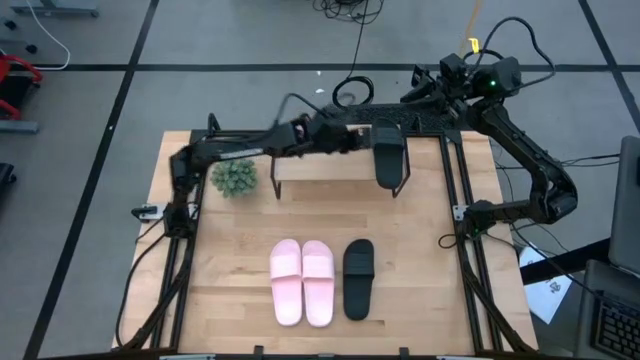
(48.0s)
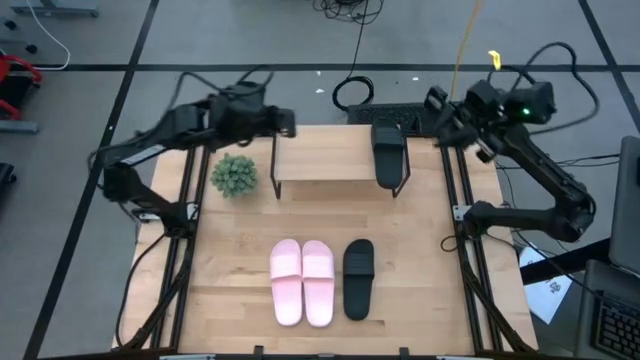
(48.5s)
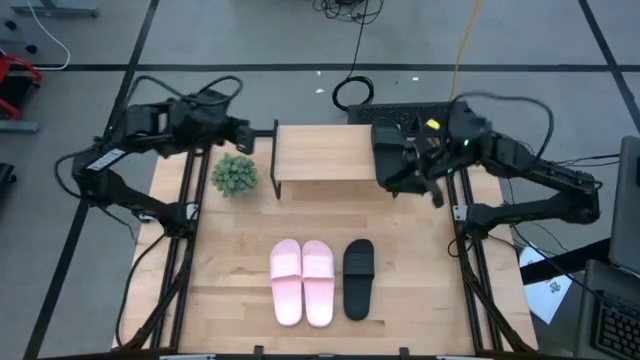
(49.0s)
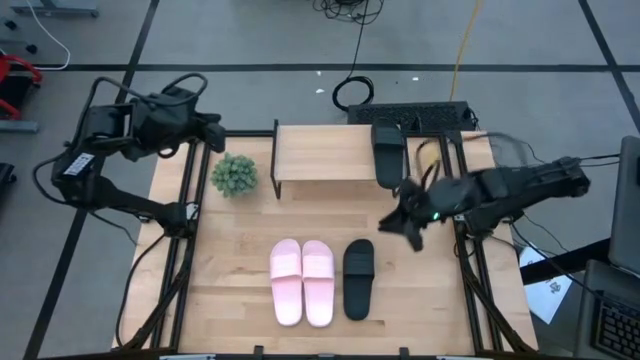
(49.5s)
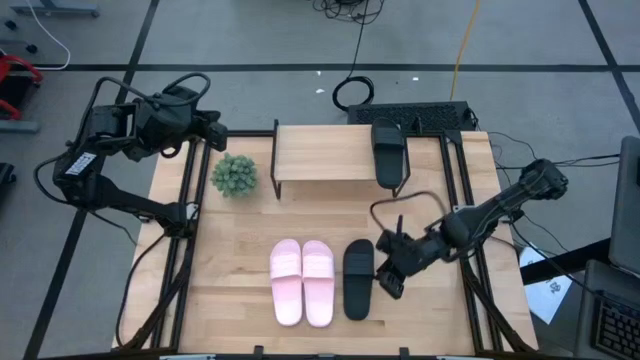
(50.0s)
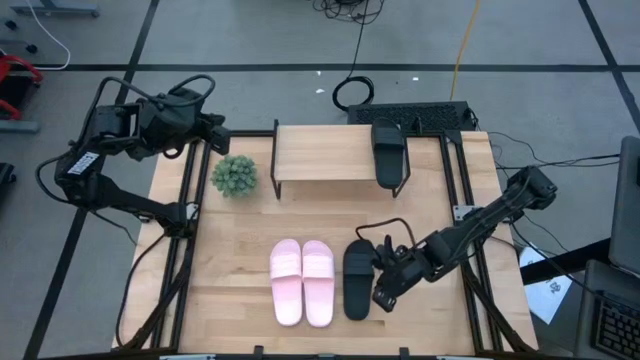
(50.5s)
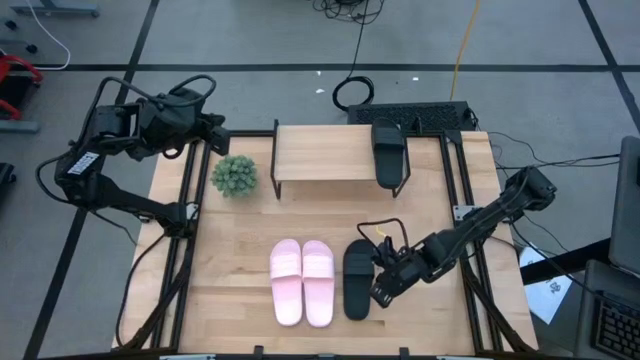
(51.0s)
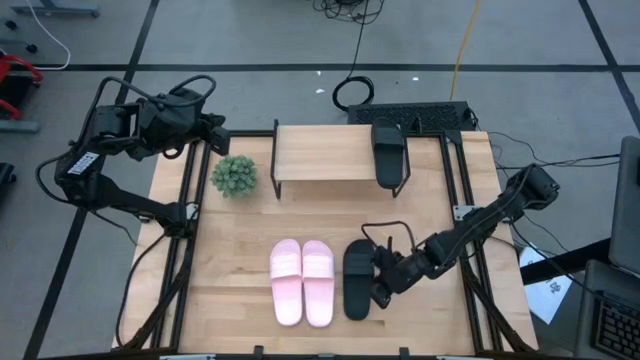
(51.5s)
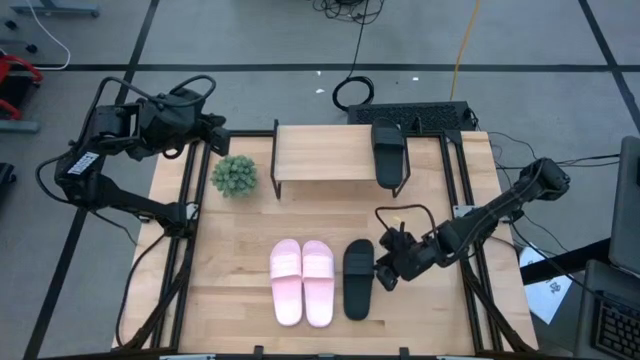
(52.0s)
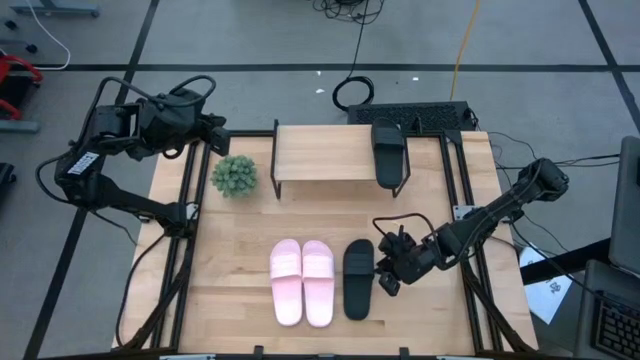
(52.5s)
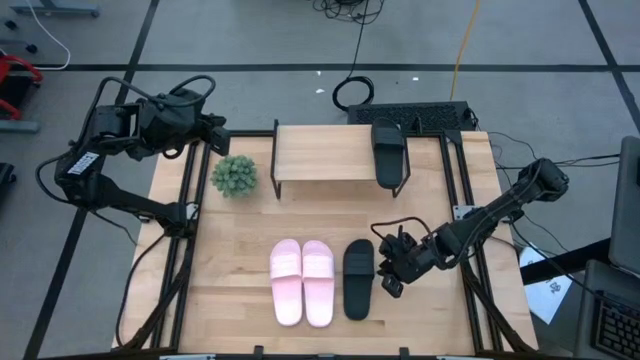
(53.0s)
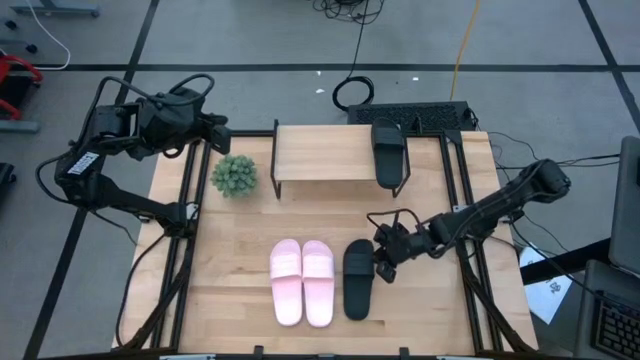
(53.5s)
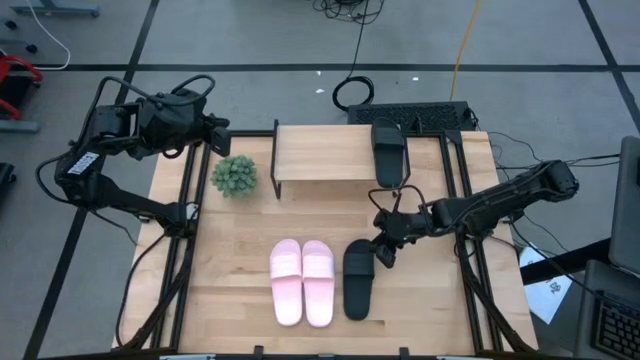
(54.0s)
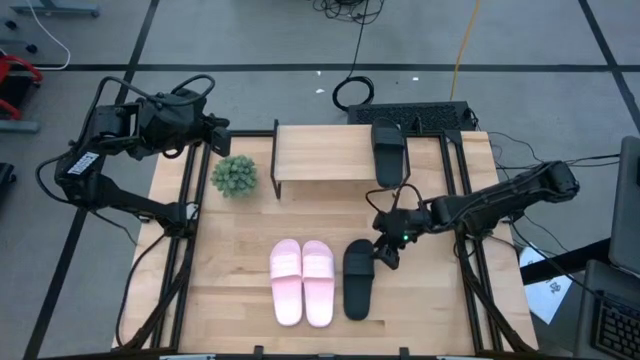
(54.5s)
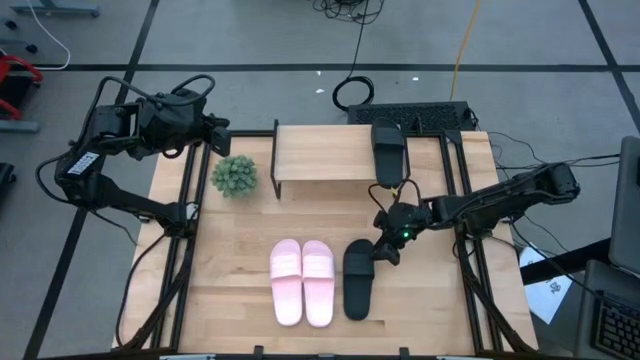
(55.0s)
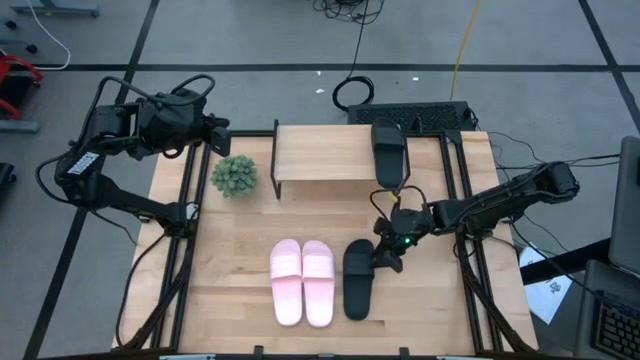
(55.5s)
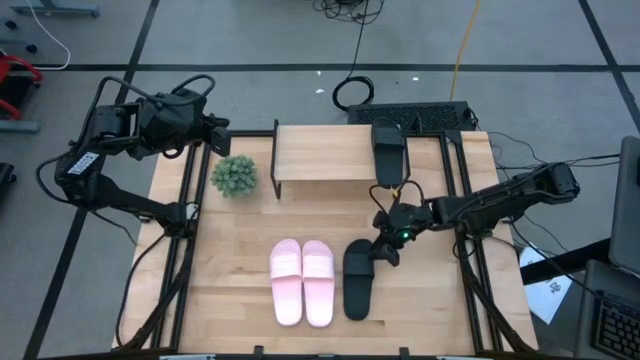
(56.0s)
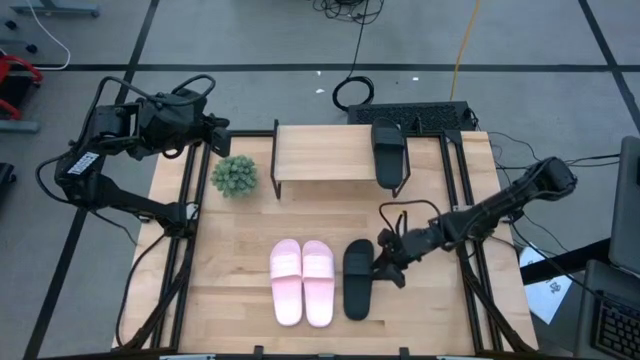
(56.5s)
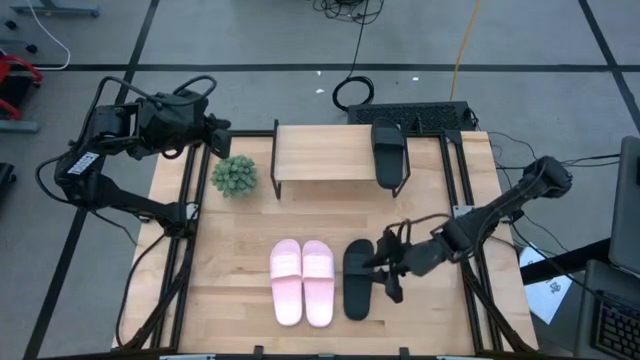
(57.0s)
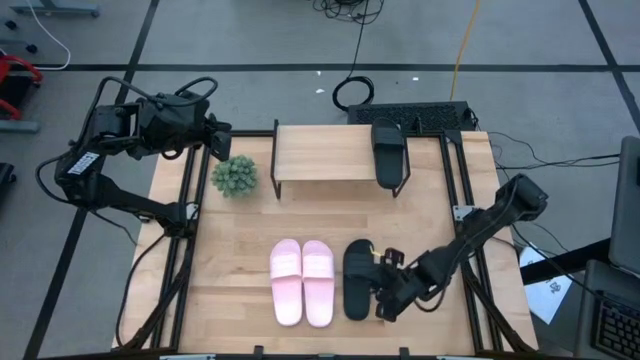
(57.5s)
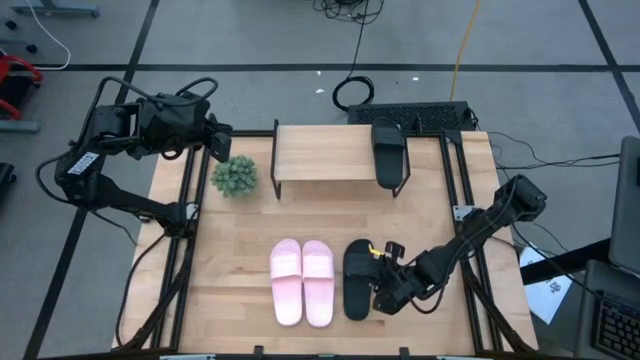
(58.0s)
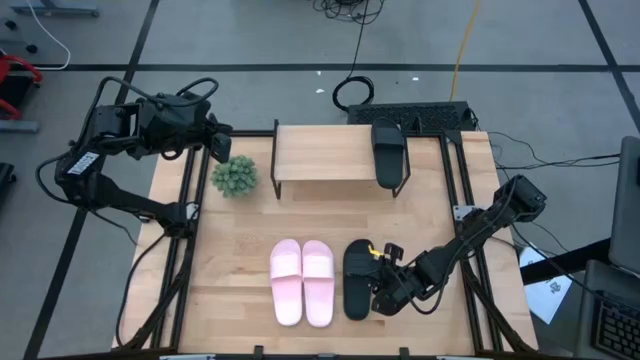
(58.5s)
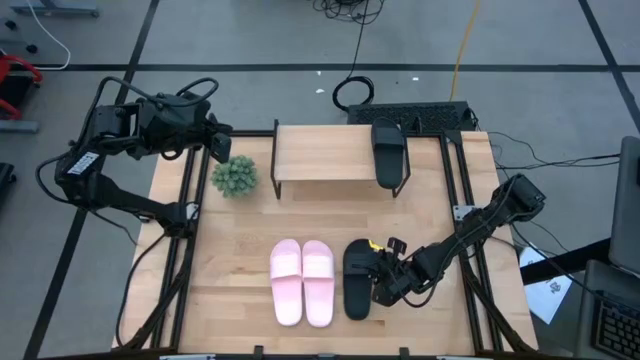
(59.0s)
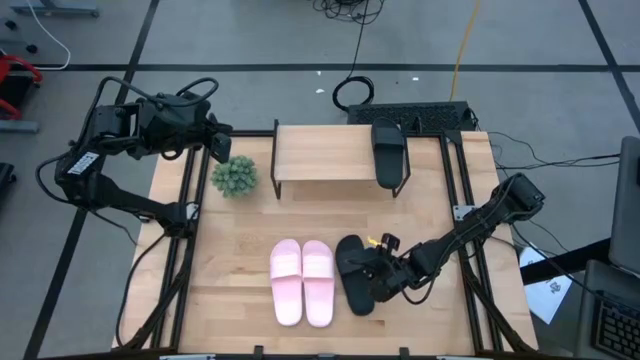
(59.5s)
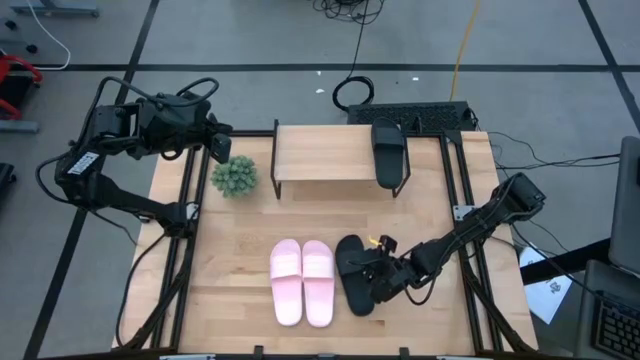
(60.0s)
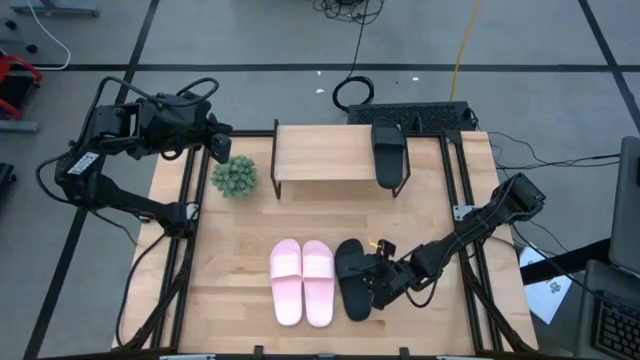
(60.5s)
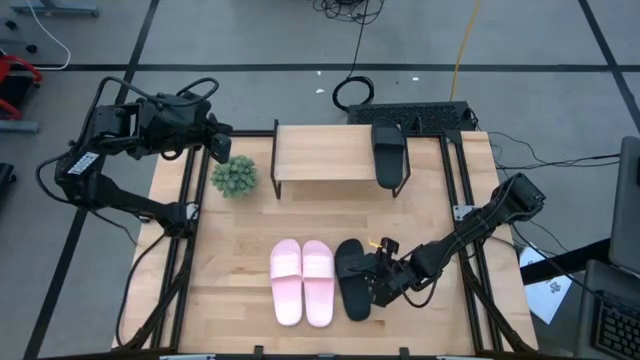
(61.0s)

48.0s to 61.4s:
Task: Pick and place slides into the shelf
Put the black slipper on the shelf

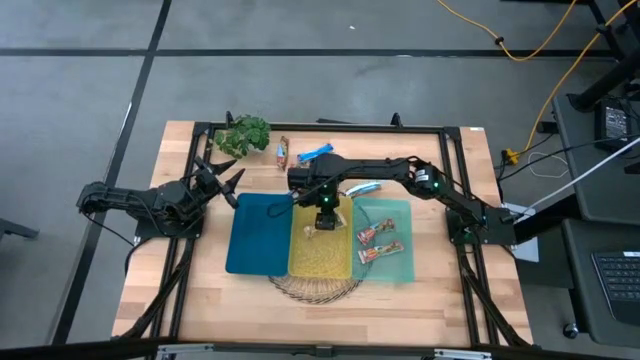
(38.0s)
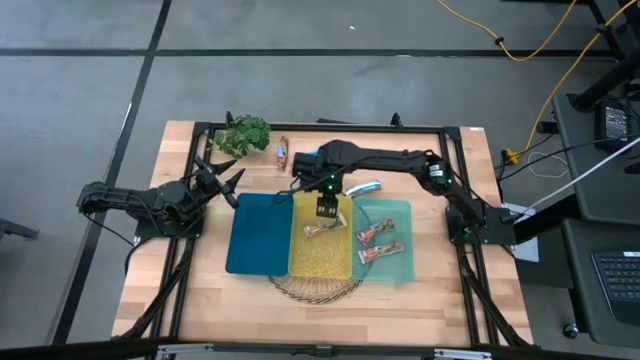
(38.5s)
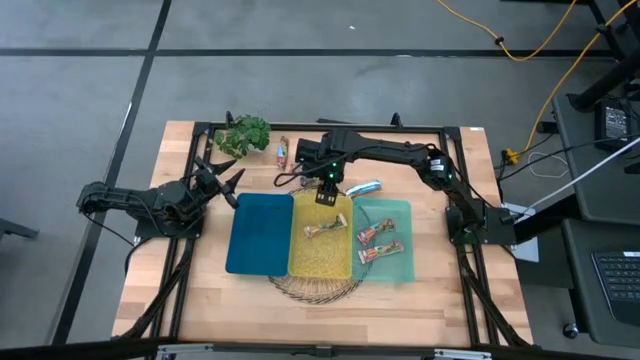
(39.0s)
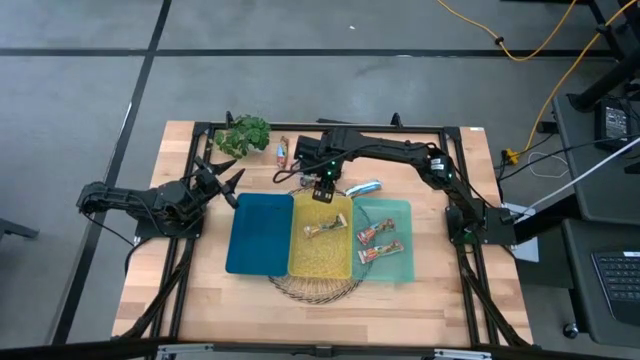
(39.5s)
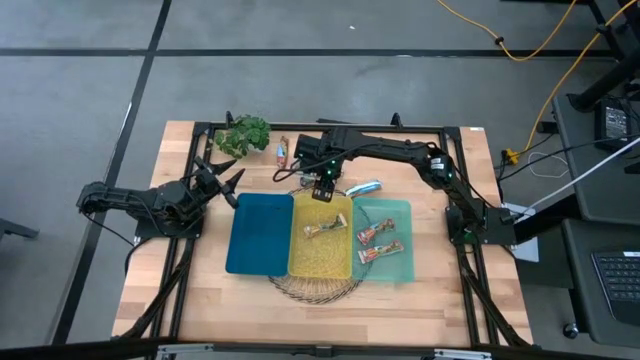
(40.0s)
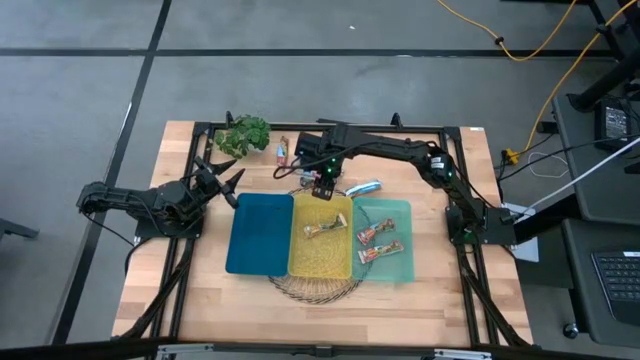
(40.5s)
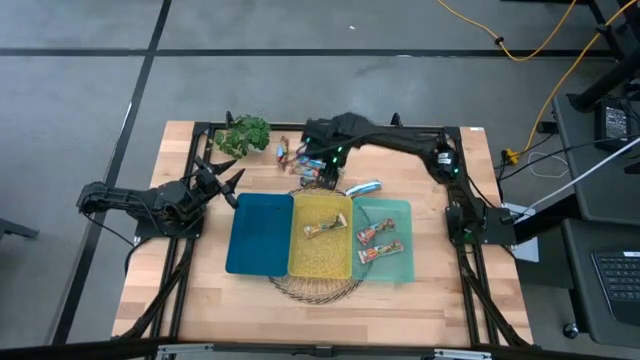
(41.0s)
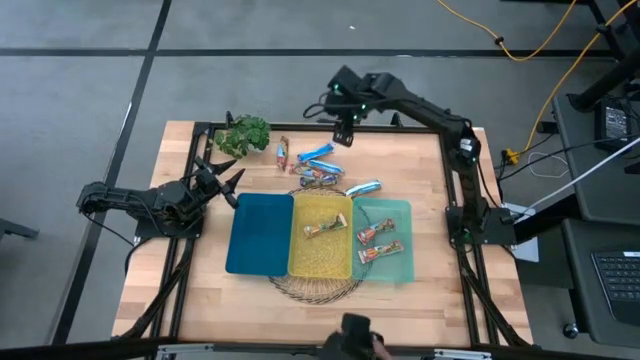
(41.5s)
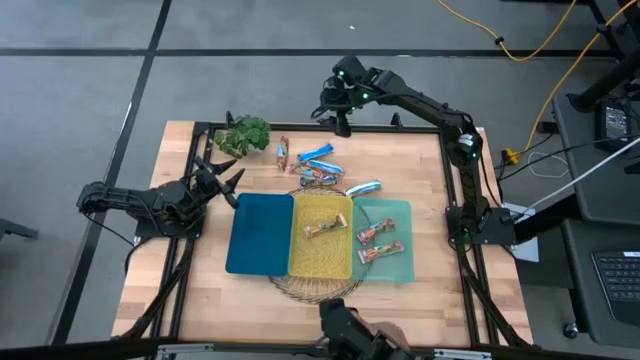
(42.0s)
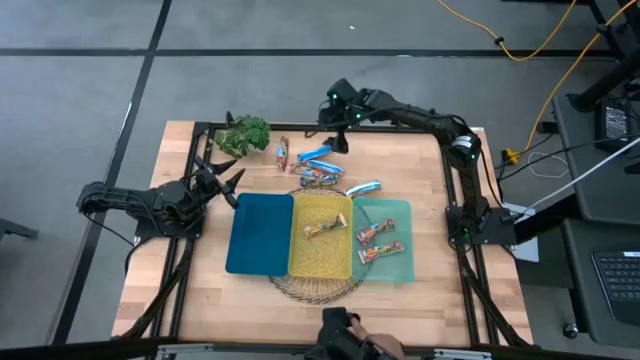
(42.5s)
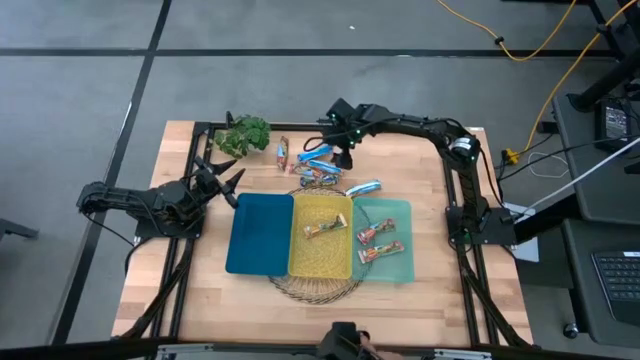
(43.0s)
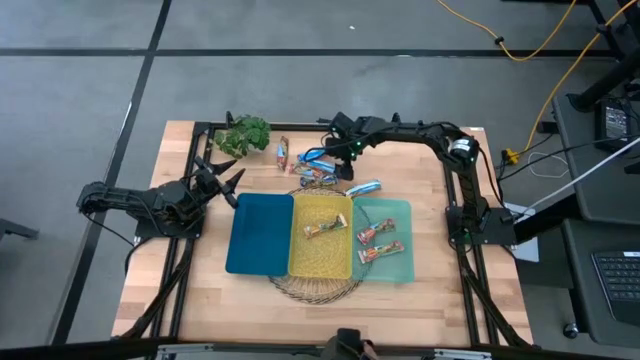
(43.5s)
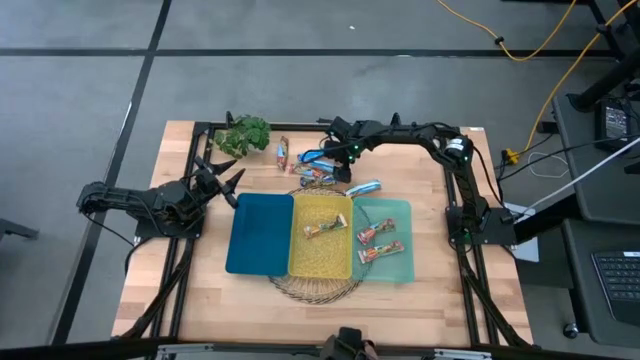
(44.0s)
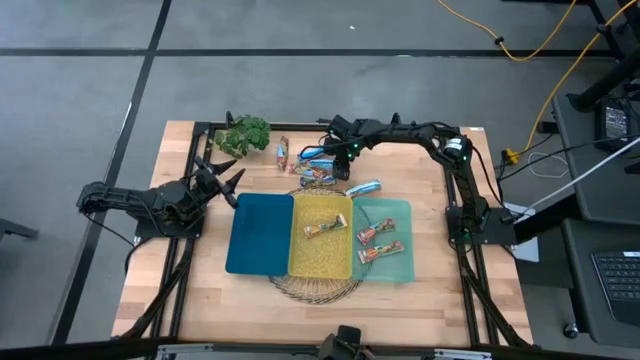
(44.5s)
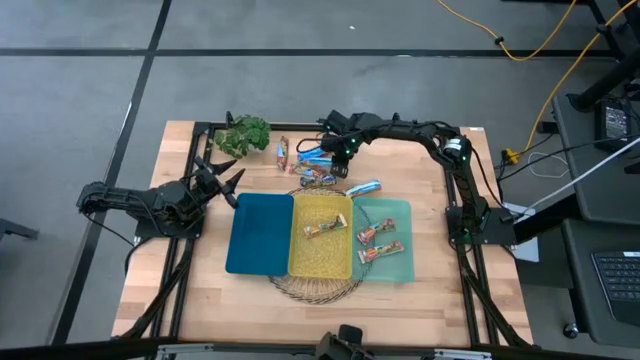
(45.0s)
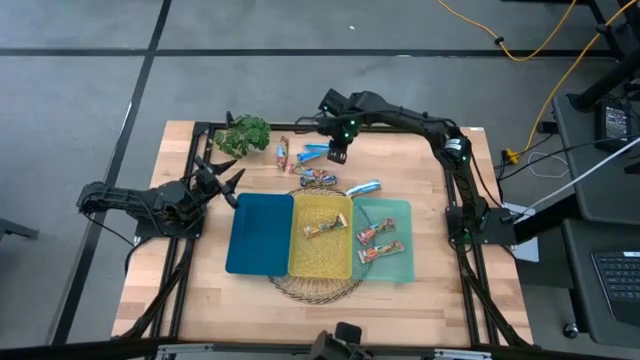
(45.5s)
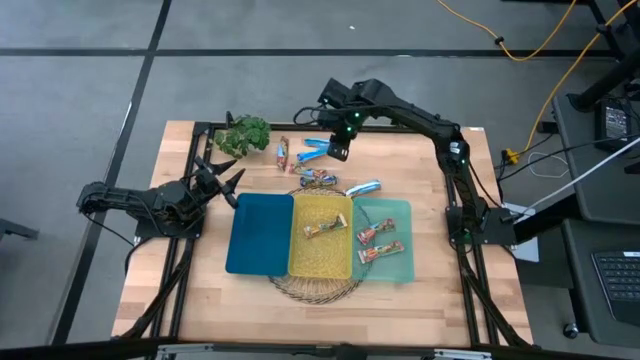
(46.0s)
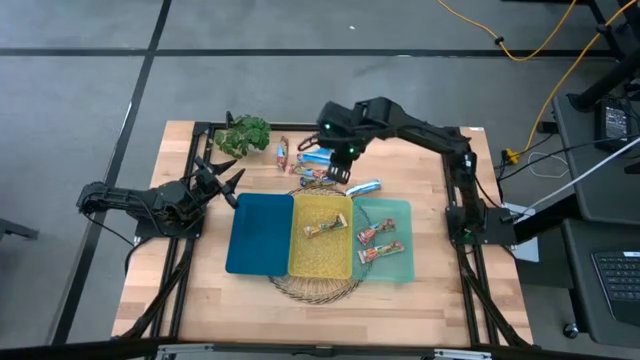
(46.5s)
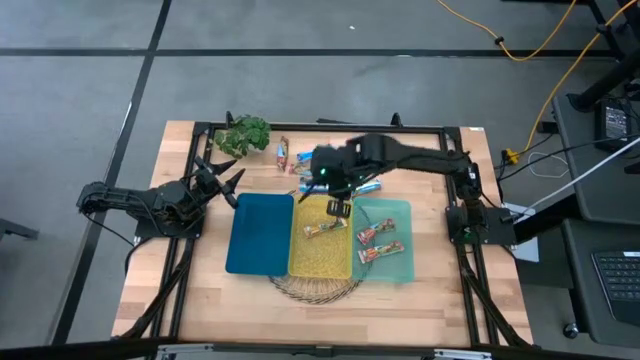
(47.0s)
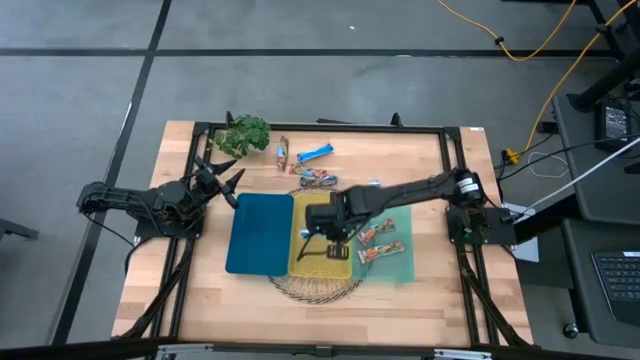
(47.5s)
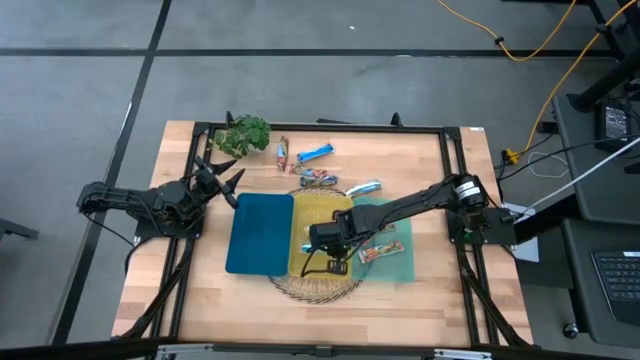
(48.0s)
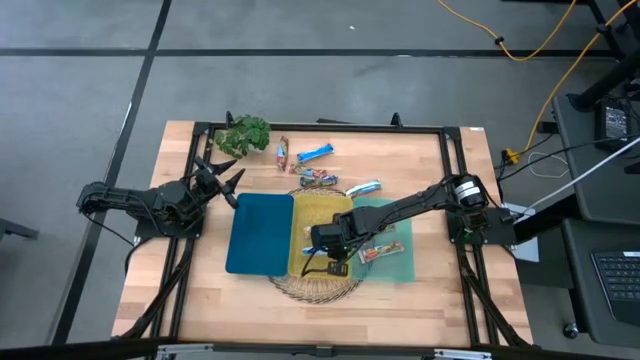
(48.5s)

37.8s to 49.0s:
Task: Pick and place Granola Bars by type
Put the yellow granola bar into the yellow bin
